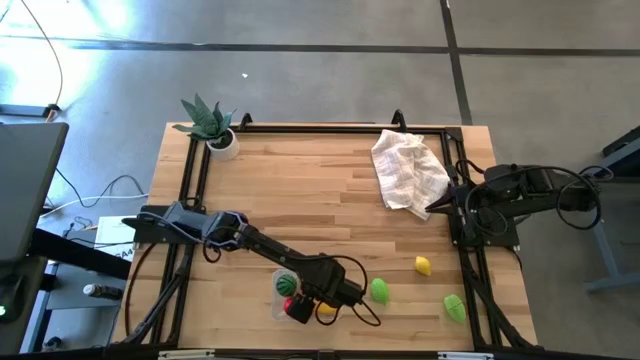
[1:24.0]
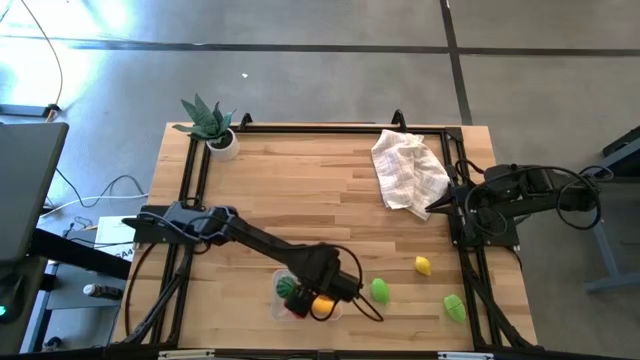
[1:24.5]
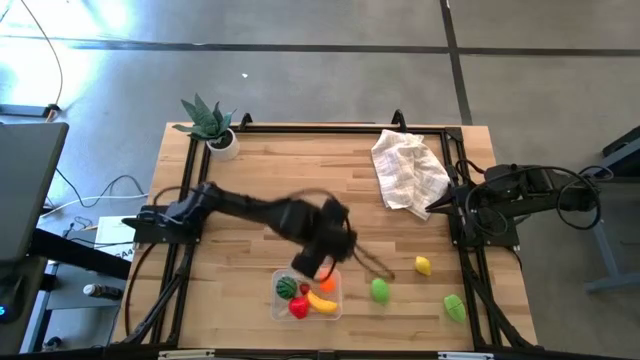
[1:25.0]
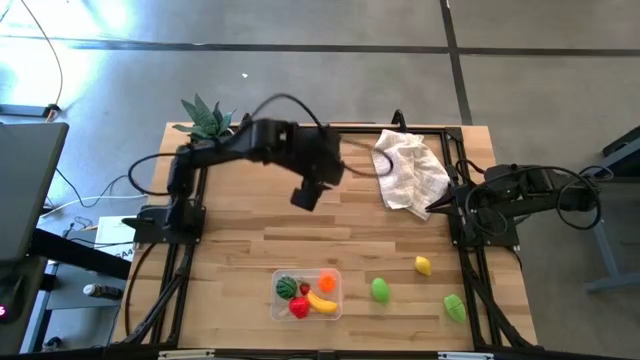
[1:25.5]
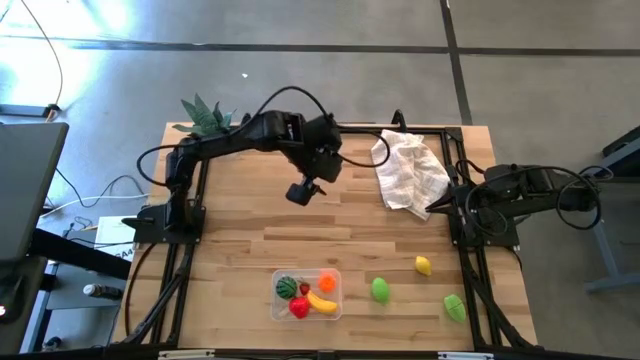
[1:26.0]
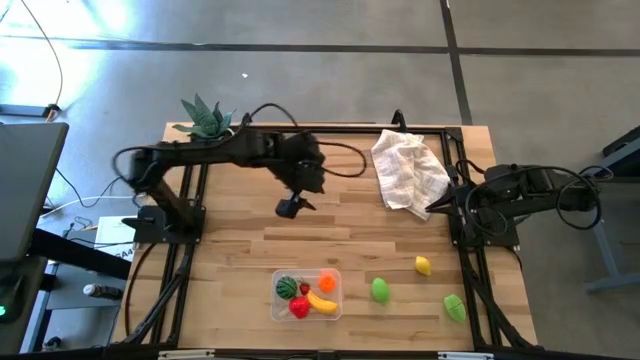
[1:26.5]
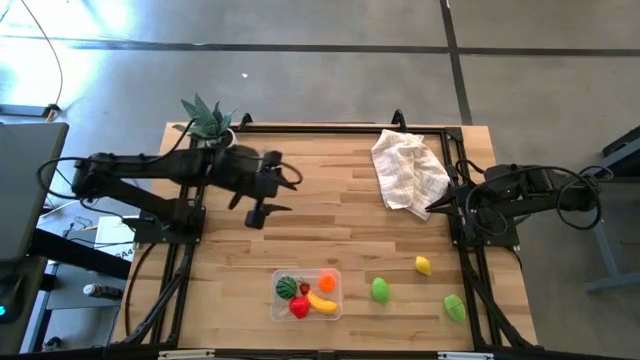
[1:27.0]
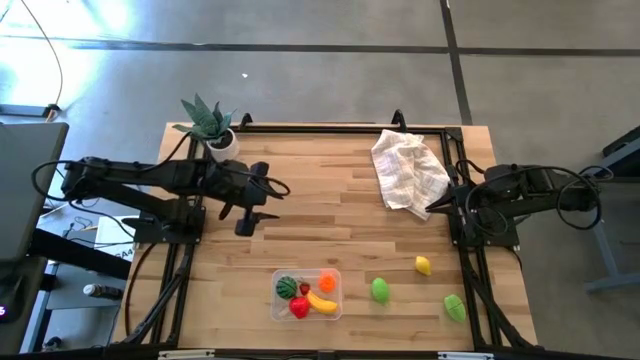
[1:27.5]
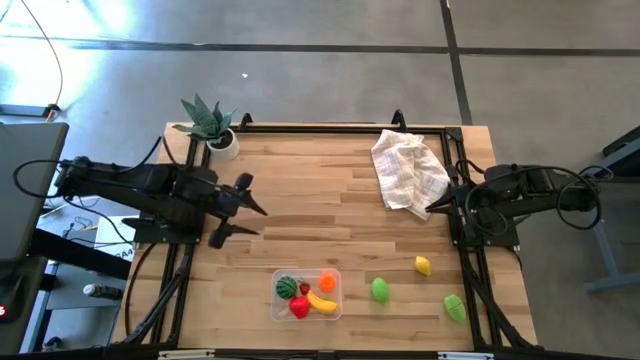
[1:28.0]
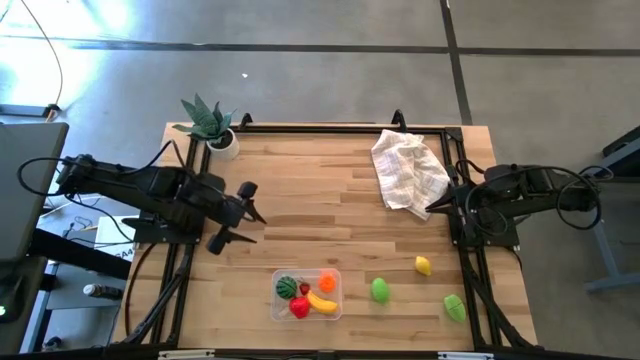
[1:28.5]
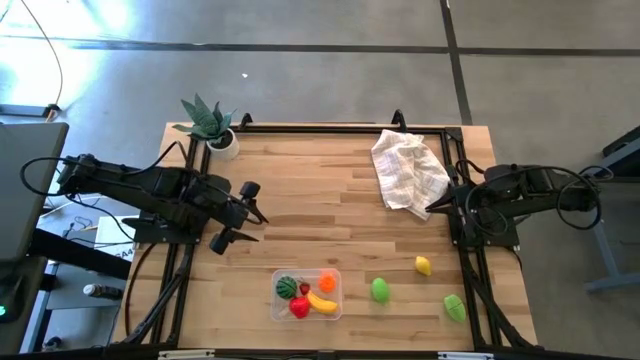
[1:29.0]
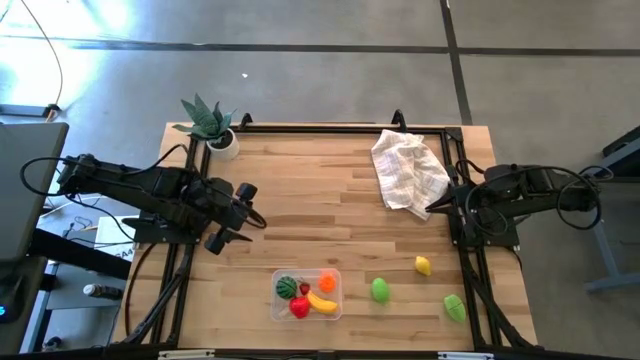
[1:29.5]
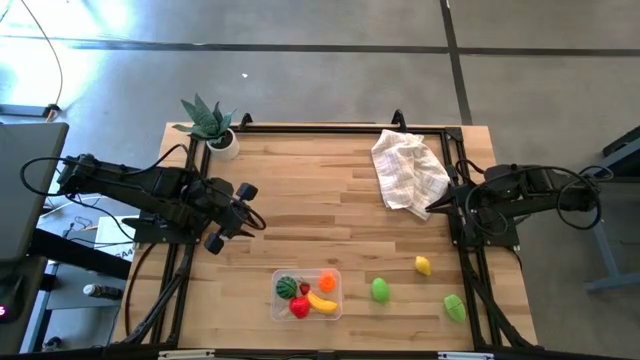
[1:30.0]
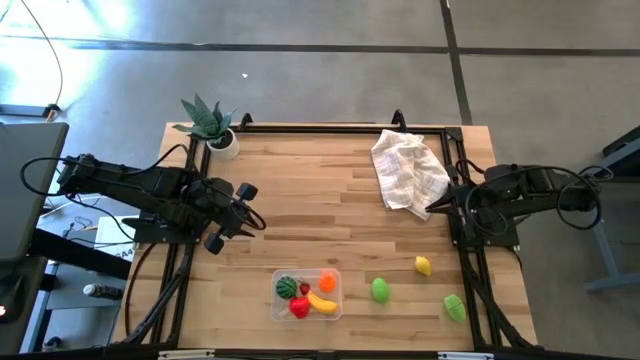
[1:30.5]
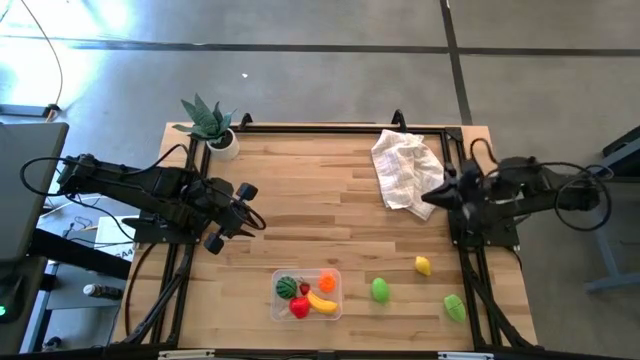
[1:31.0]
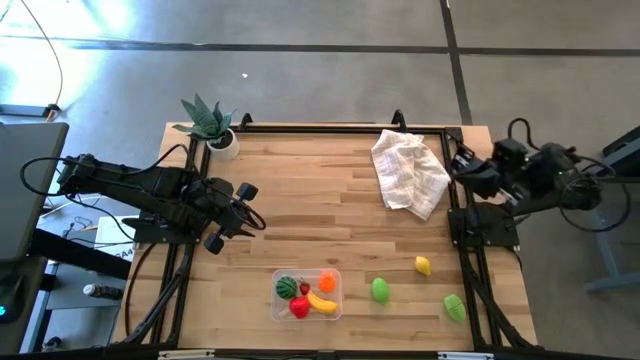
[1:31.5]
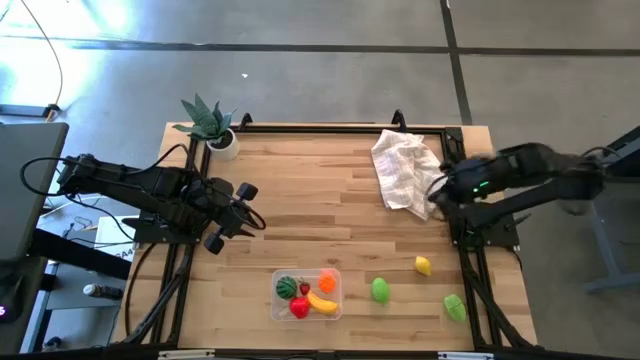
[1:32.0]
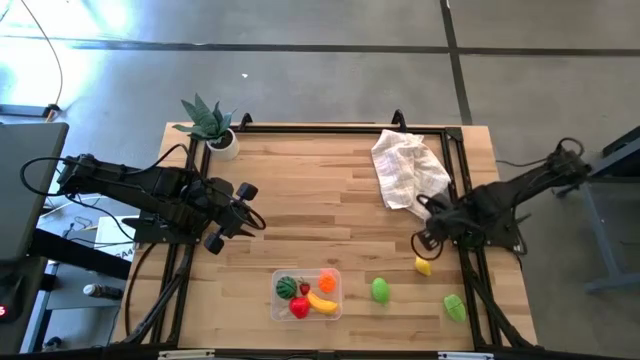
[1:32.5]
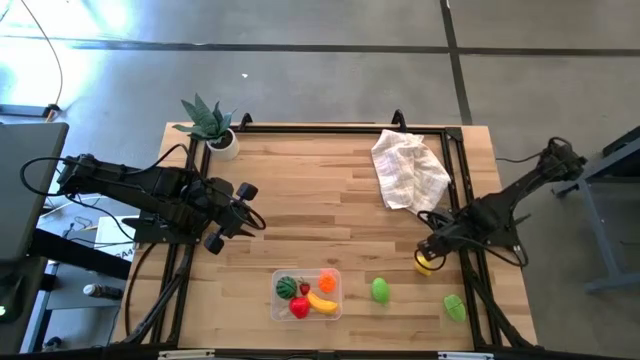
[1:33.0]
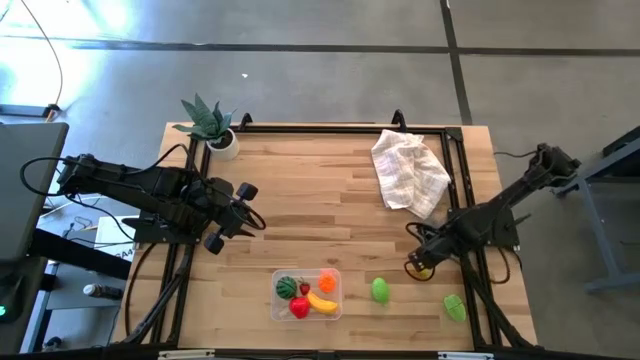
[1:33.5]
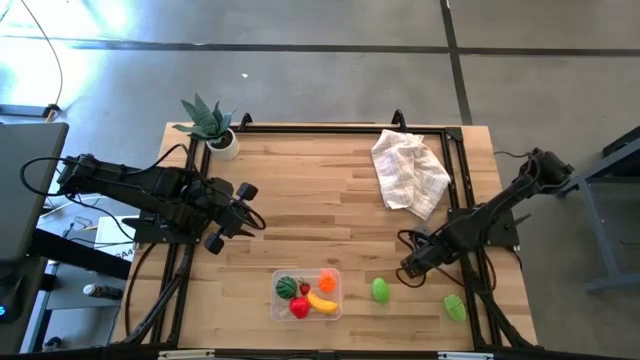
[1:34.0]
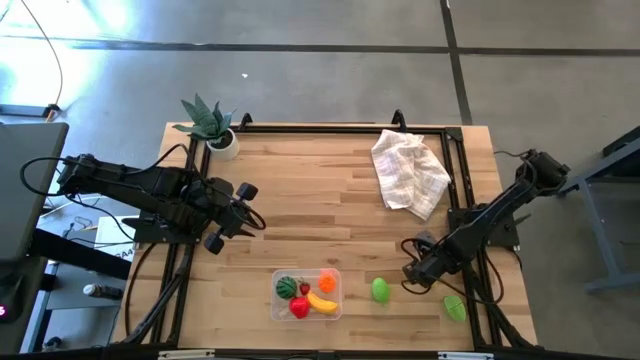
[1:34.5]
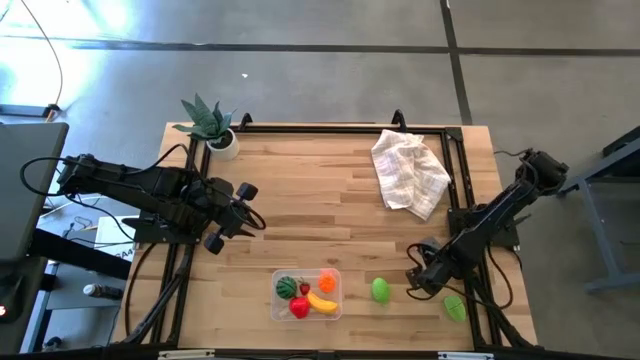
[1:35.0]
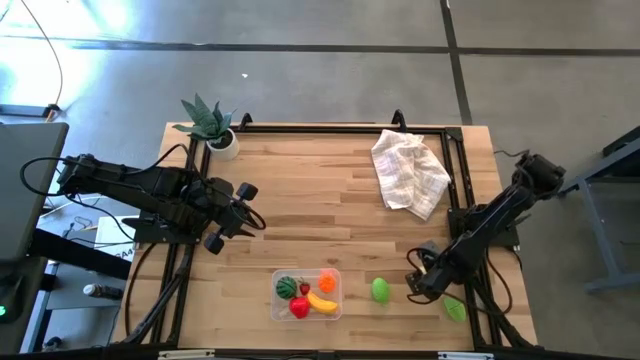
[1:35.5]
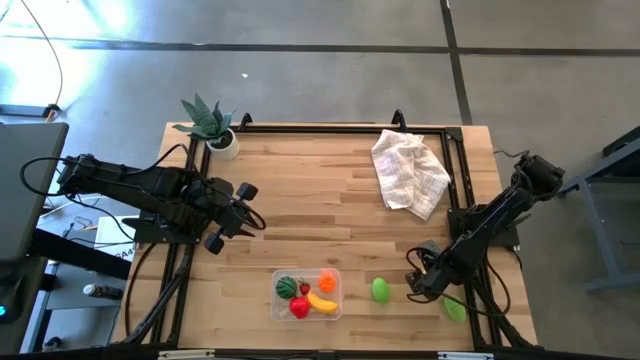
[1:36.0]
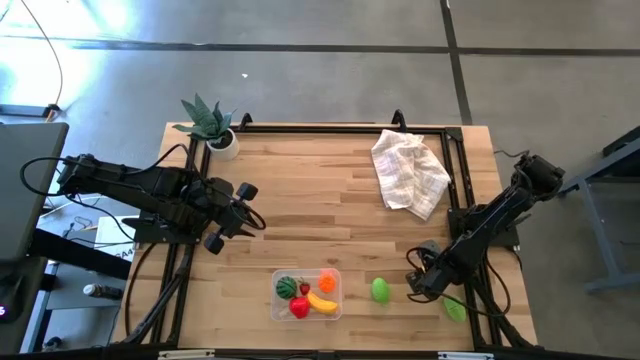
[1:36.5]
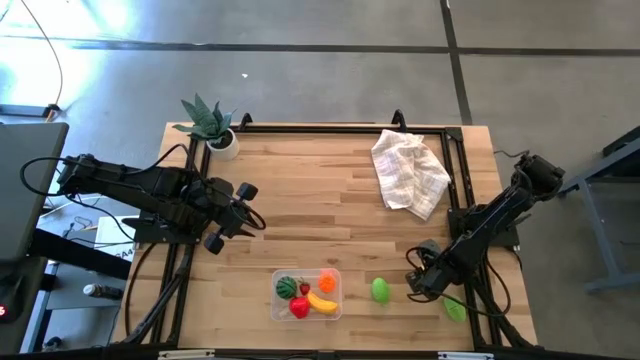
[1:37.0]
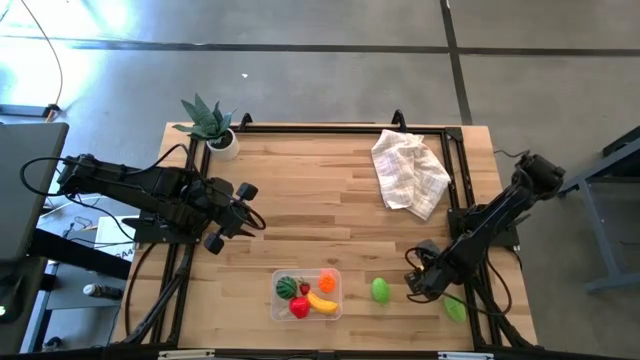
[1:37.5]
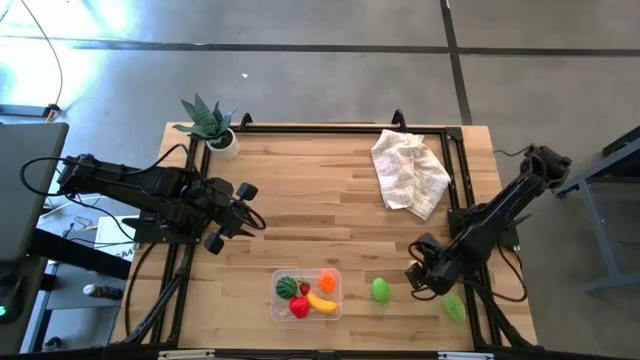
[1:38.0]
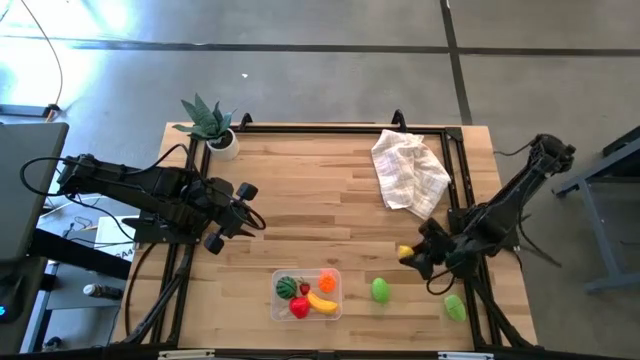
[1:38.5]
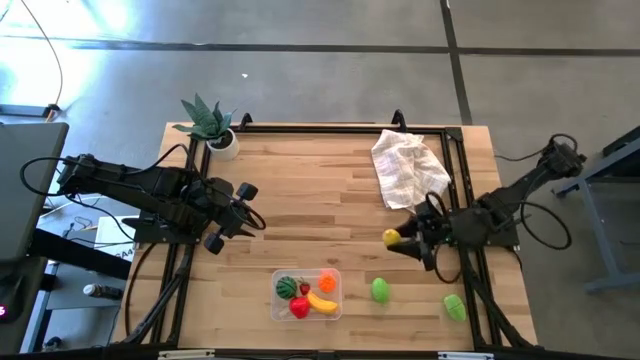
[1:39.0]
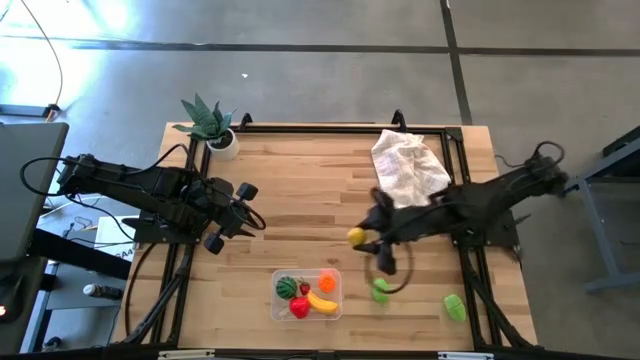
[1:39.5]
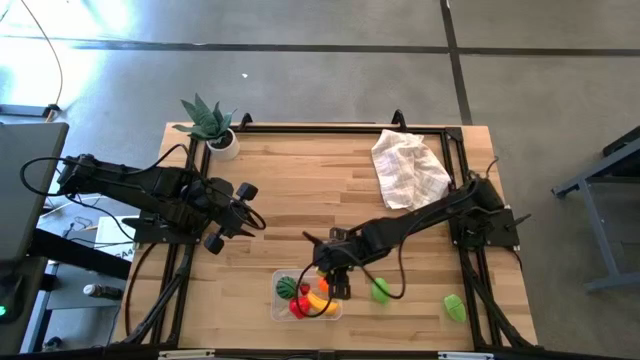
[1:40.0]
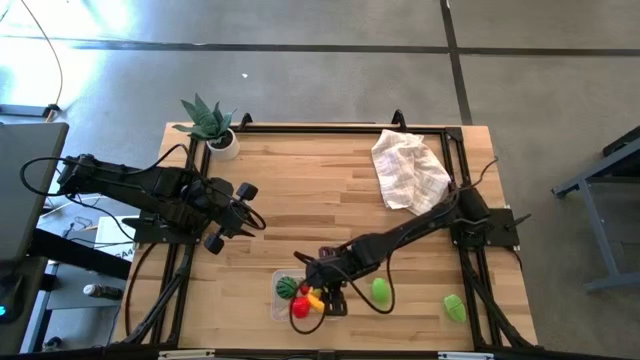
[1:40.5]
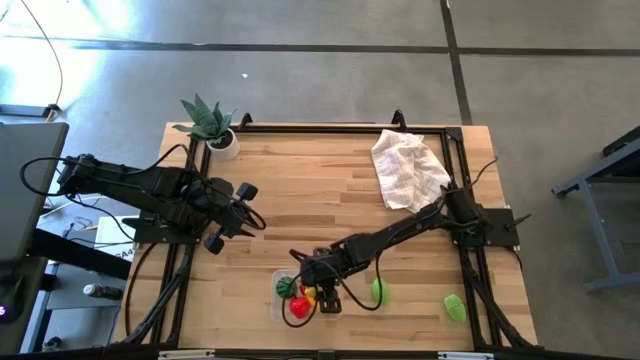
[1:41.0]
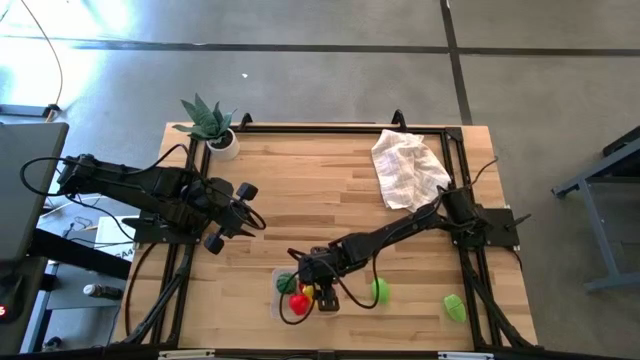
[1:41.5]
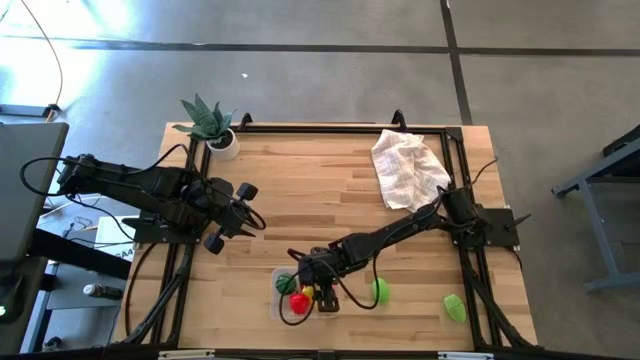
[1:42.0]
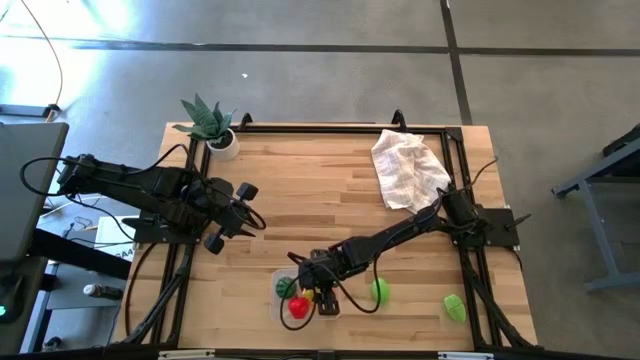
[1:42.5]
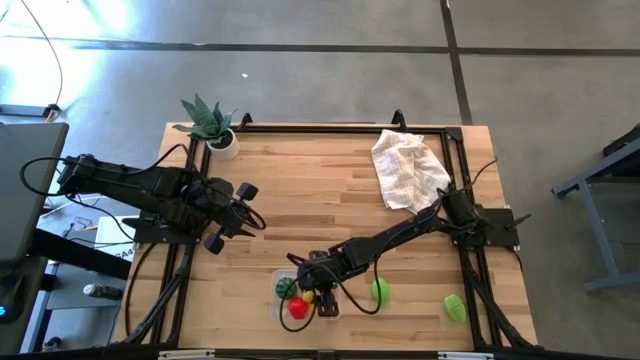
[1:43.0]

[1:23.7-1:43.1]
Task: Pick and placing Produce into tupperware
Put the lemon into the bin
